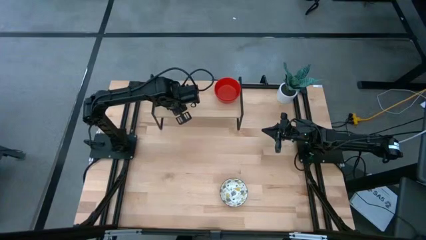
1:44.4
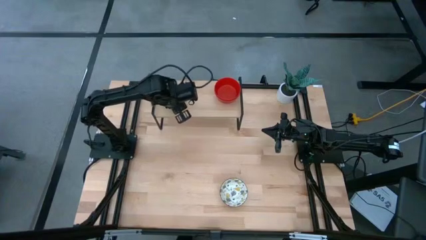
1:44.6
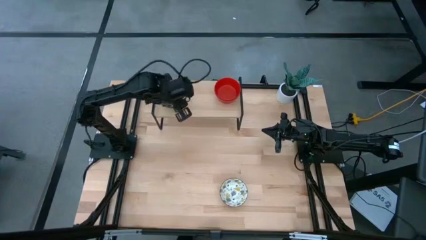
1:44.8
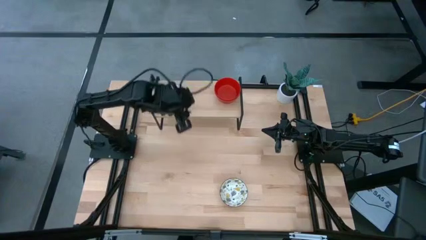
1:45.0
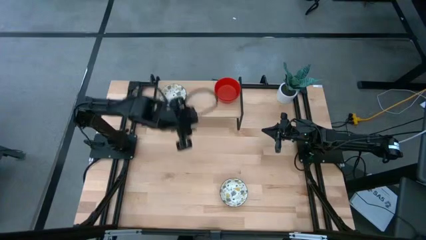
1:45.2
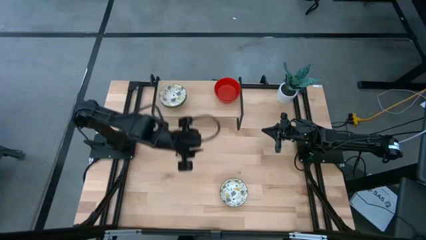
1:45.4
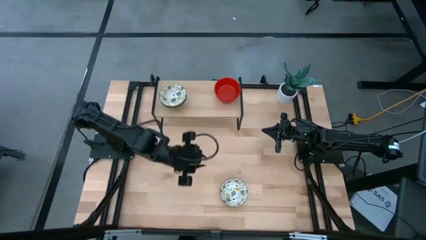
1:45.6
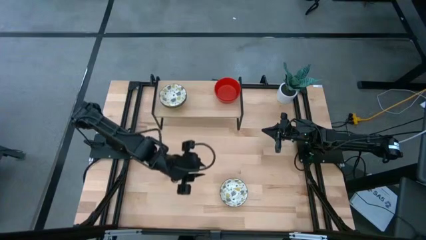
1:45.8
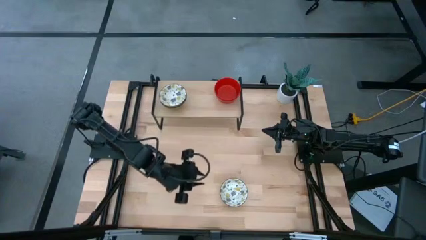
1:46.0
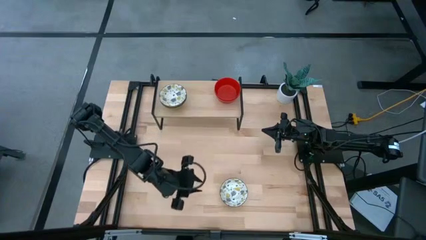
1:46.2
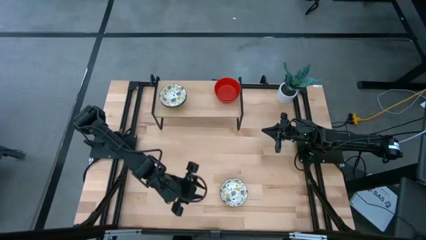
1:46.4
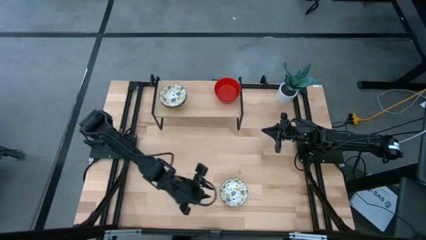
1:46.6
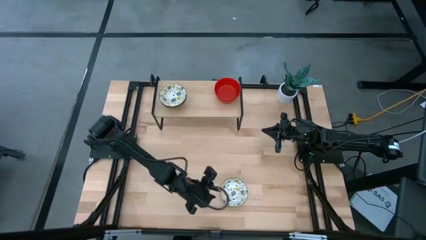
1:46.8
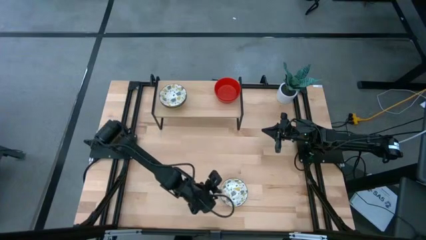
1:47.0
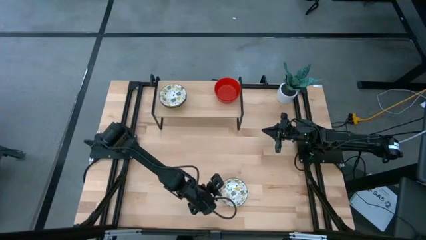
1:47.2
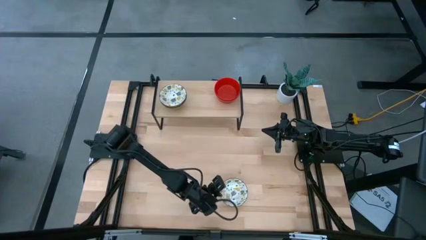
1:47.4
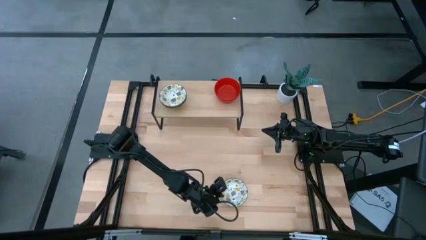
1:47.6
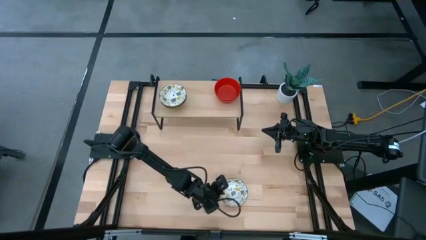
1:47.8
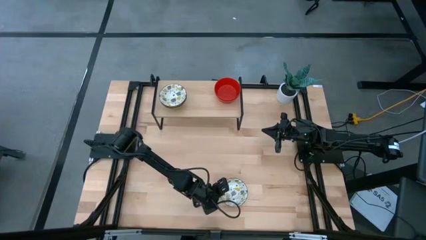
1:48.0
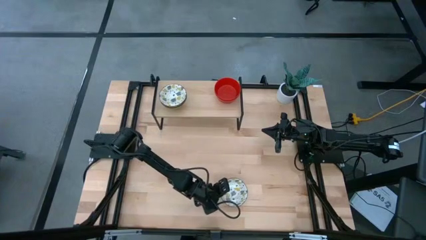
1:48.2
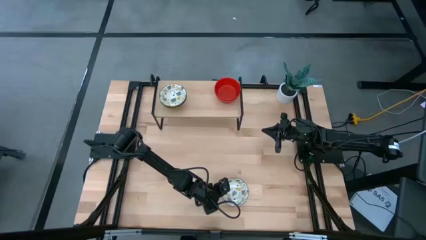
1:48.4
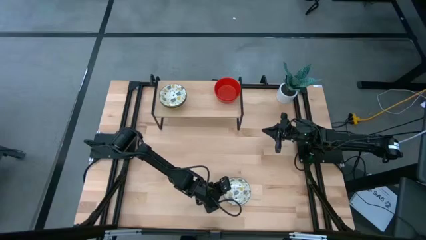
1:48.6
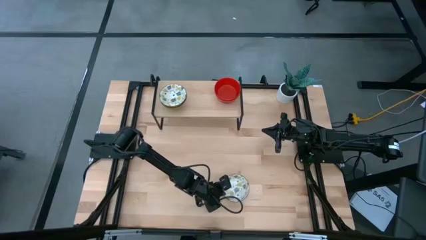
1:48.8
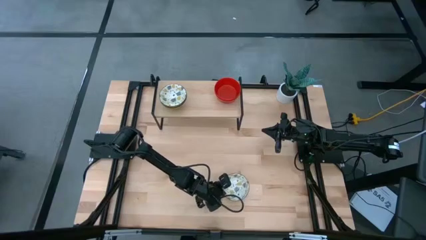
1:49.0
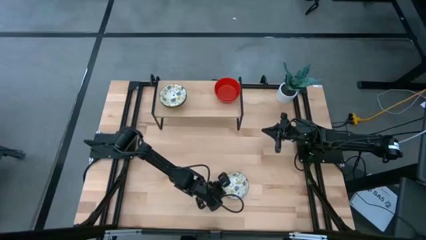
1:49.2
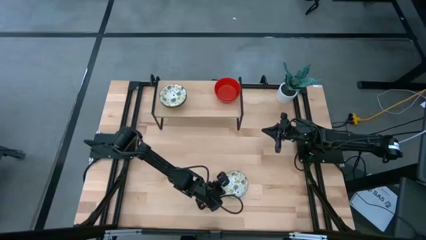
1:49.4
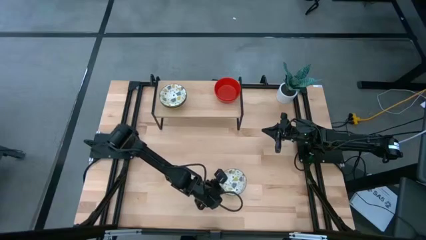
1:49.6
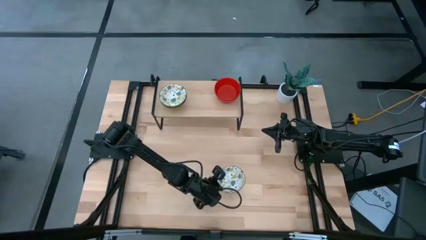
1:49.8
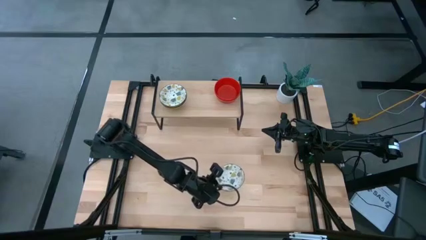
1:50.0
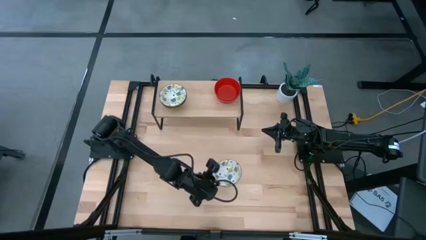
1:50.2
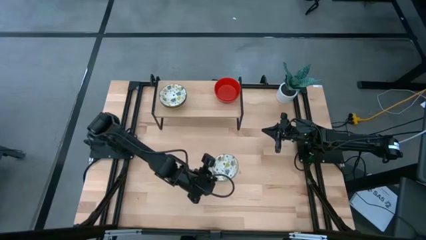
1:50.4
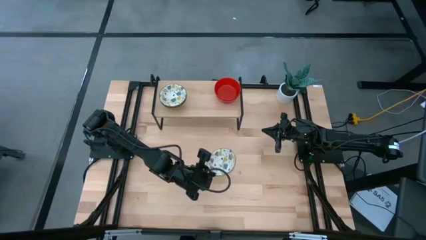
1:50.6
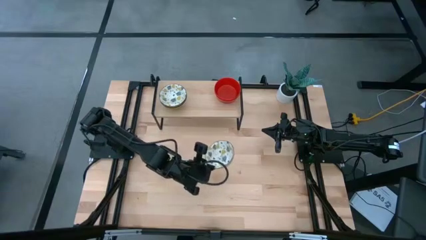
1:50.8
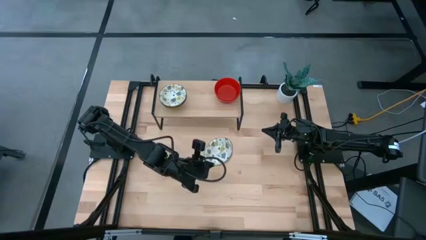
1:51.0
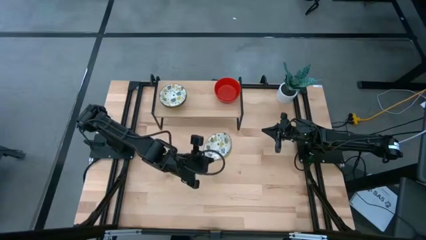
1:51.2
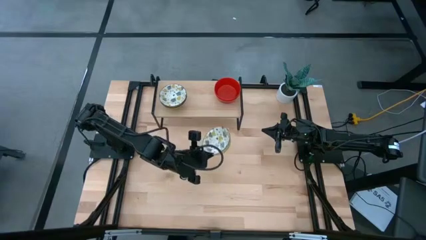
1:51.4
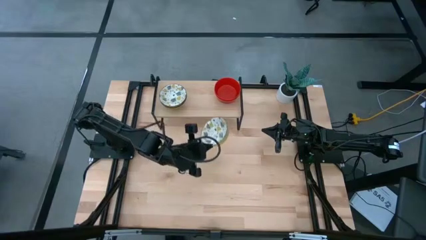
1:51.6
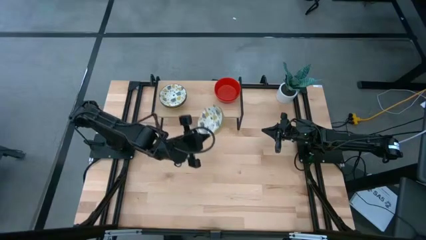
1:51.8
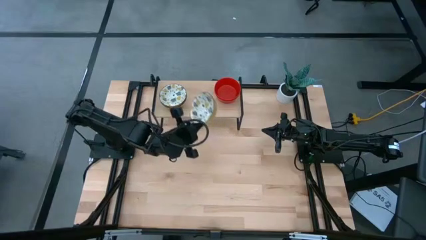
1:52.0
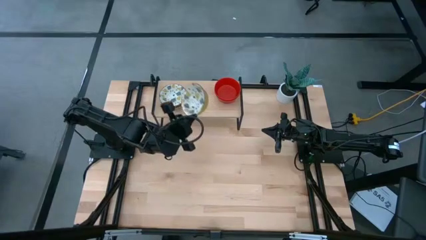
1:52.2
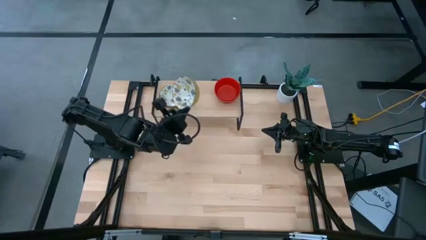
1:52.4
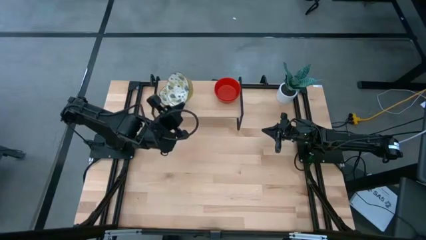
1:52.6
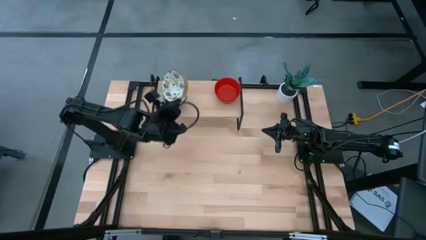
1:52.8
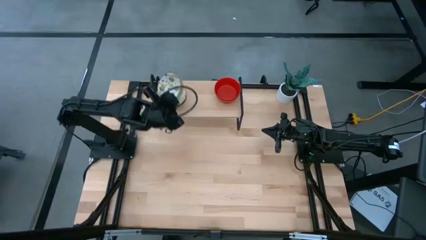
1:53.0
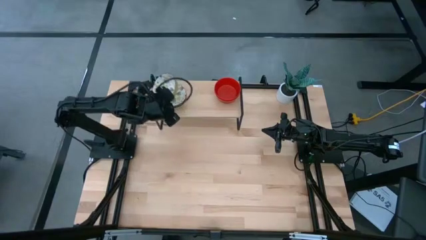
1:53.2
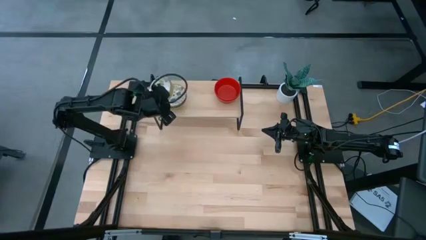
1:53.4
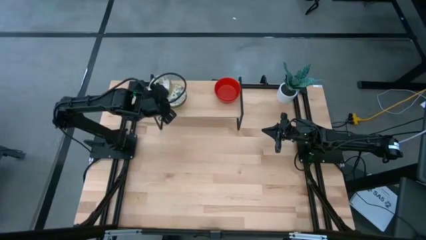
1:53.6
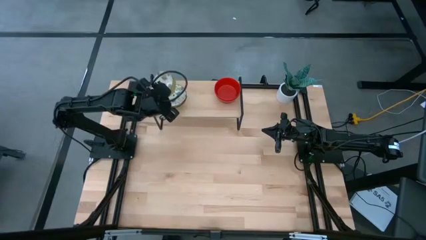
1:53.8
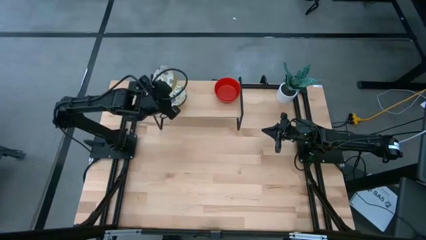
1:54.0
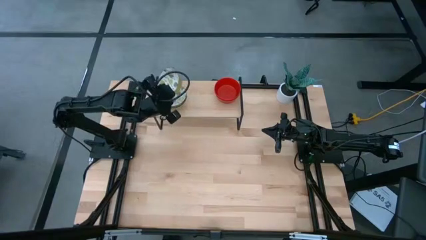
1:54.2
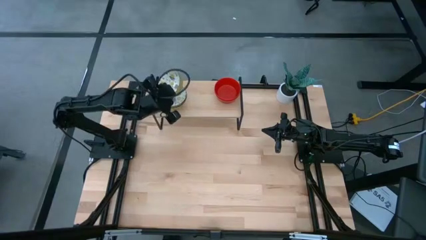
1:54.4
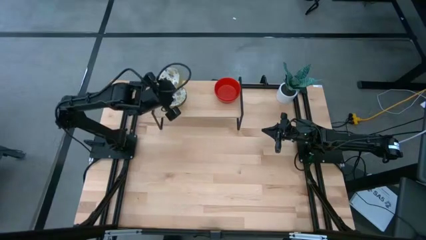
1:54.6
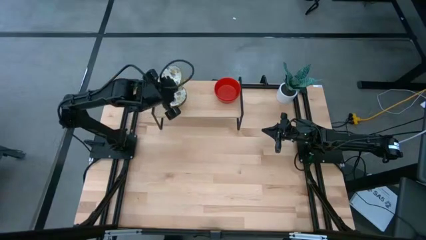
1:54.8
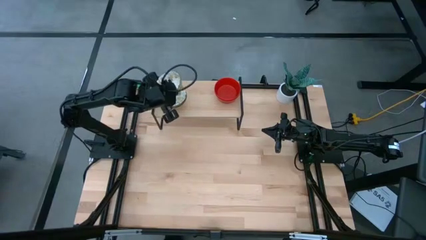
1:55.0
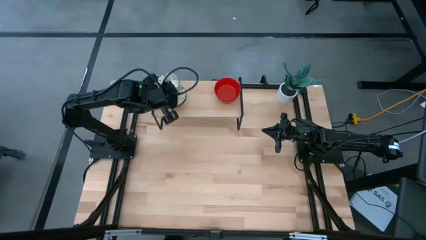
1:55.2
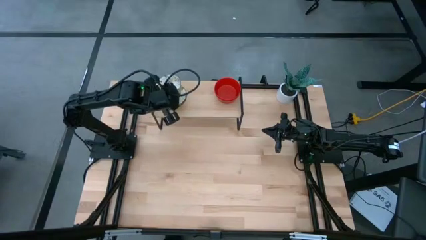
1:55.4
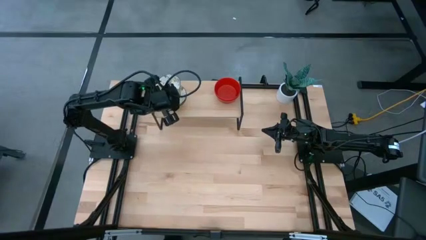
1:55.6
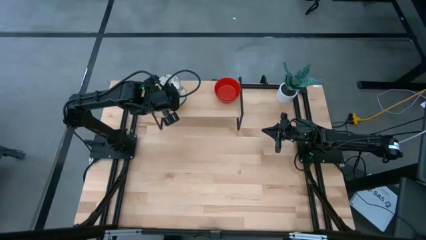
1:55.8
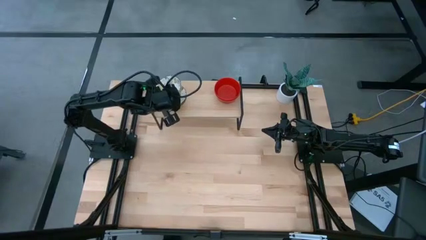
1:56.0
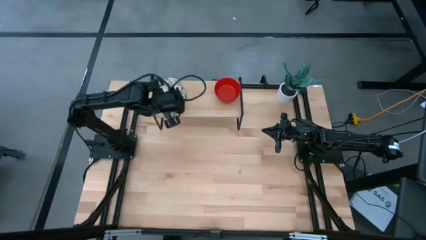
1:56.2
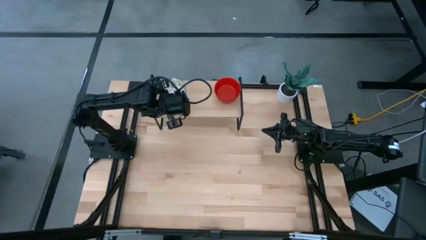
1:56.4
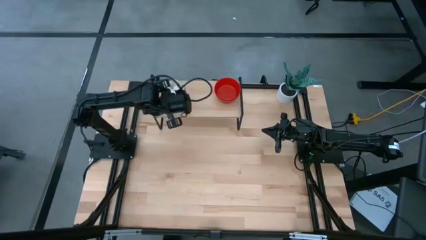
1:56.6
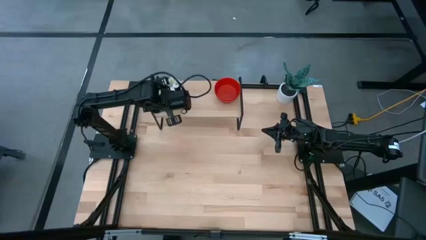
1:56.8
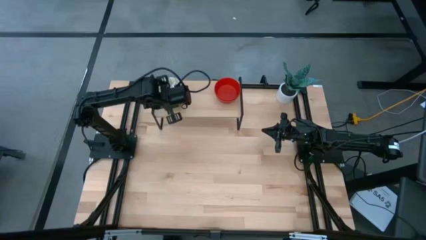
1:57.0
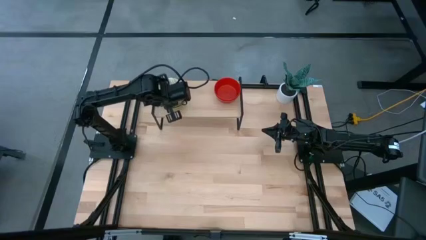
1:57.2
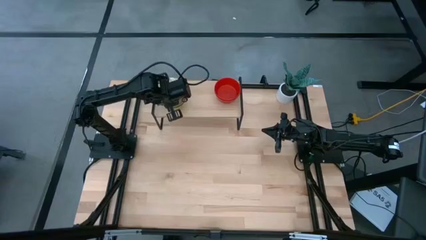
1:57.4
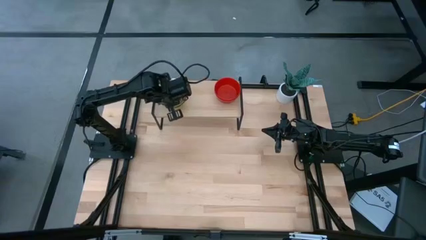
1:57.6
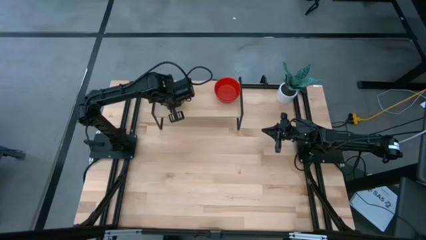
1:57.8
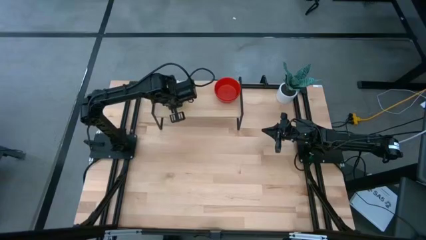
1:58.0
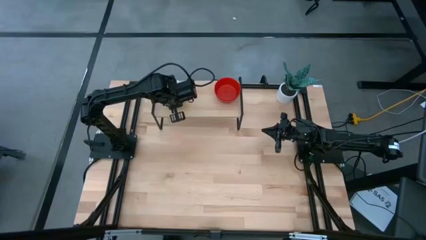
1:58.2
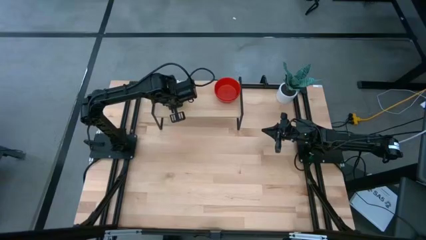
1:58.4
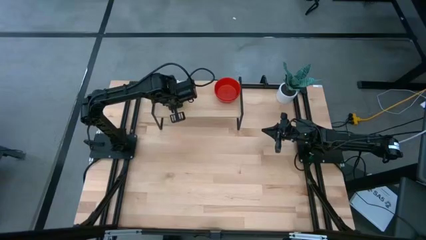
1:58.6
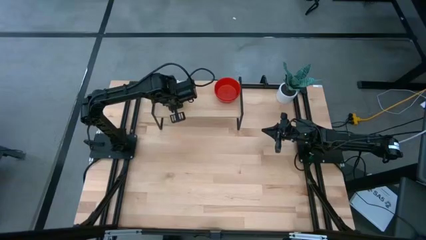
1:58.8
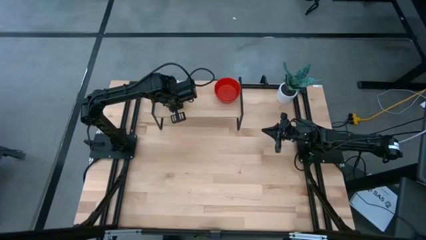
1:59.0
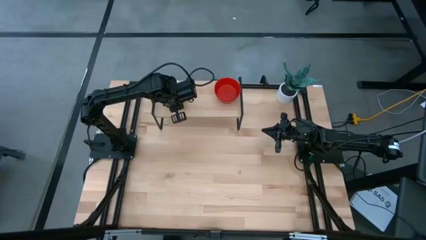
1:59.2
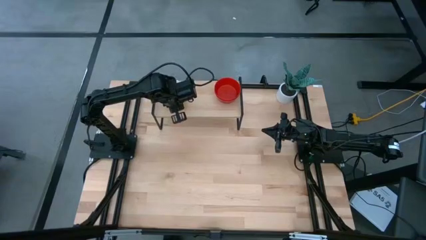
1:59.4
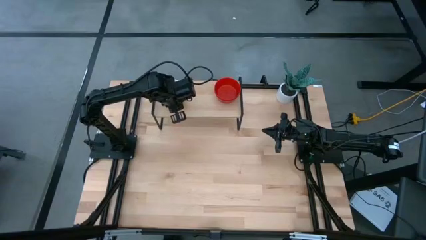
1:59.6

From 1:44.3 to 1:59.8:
Task: Pick & Place Mini bowls
Stack the yellow patterned bowl on the yellow patterned bowl on the shelf

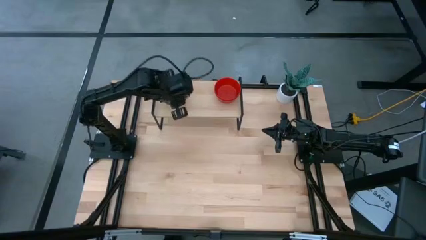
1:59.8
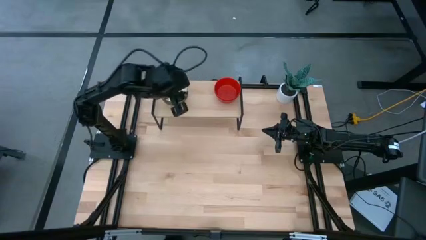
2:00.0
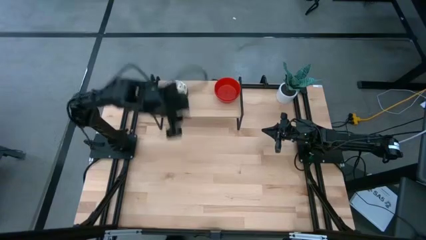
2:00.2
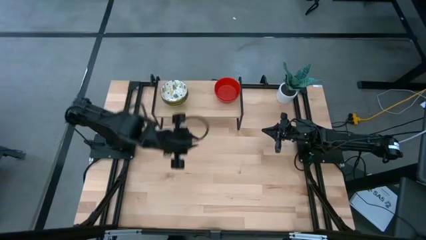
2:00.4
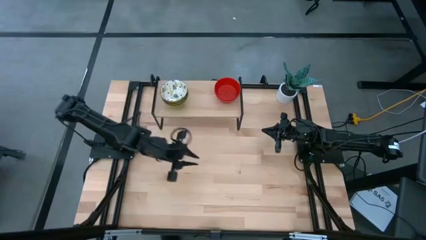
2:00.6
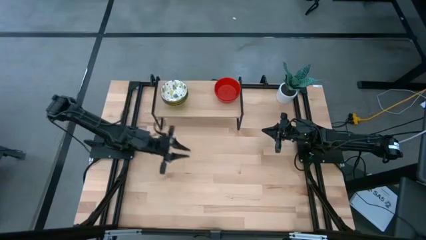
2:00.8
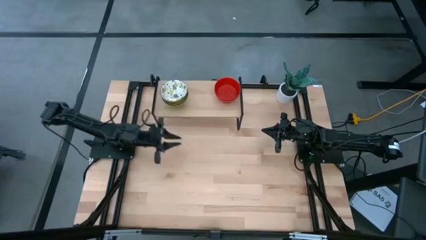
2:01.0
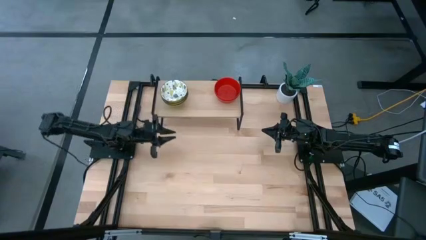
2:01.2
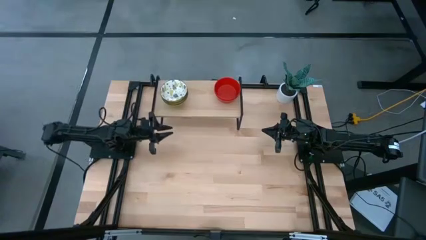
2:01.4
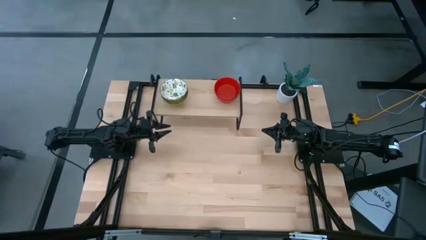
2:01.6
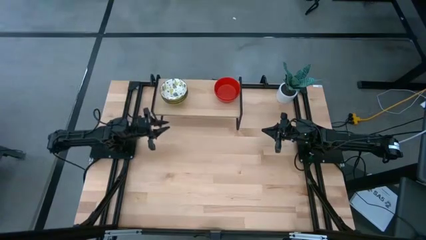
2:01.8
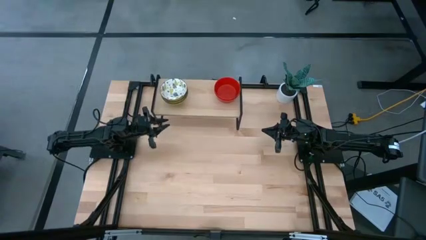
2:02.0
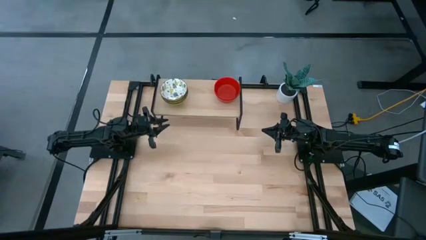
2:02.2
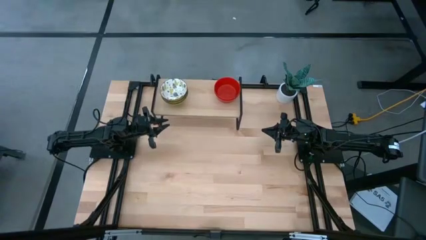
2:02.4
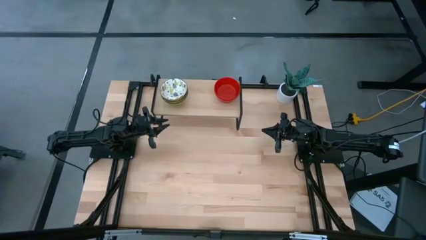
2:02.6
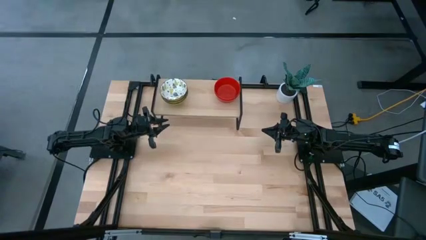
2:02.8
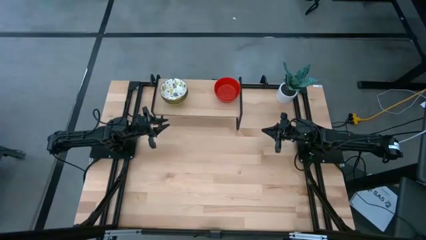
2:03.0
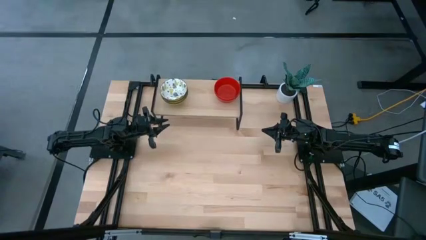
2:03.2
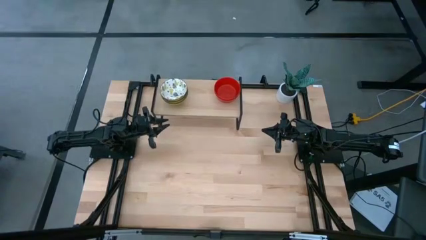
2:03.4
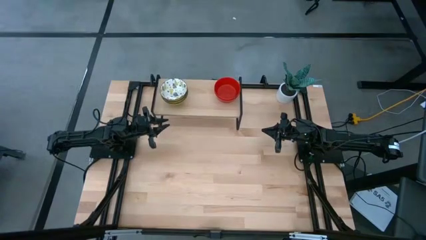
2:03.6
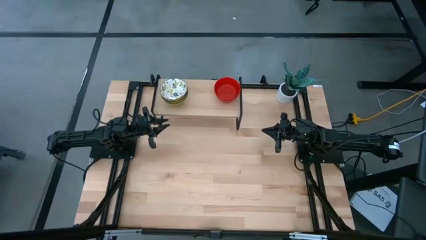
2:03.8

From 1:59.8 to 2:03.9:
Return to Home Position
